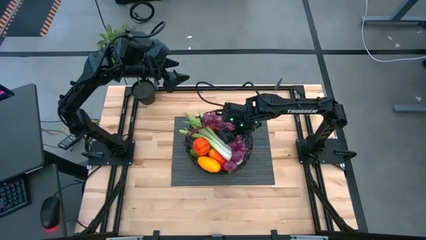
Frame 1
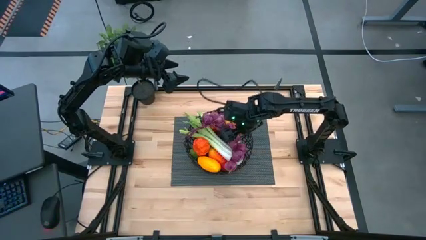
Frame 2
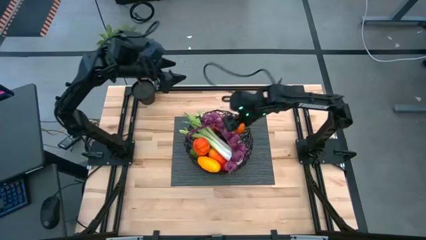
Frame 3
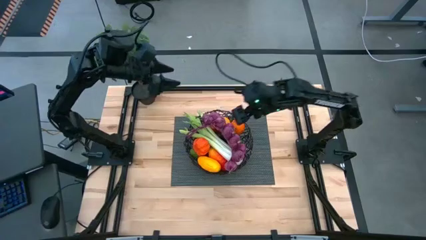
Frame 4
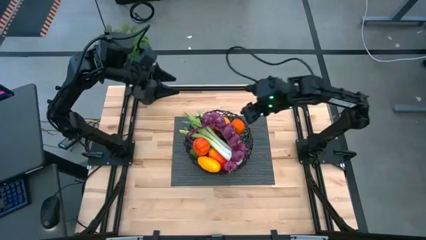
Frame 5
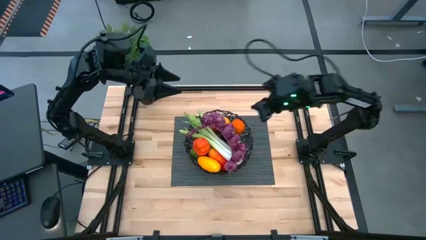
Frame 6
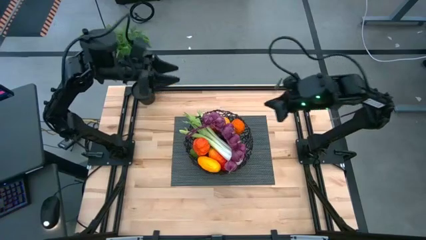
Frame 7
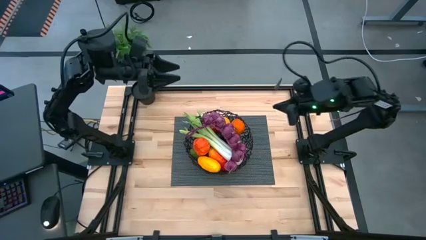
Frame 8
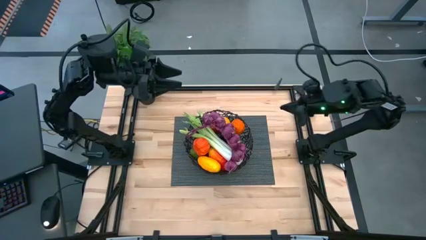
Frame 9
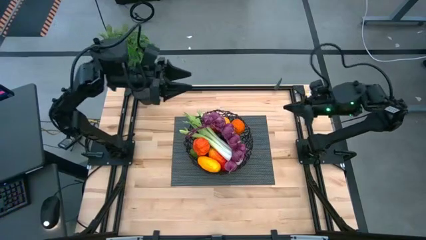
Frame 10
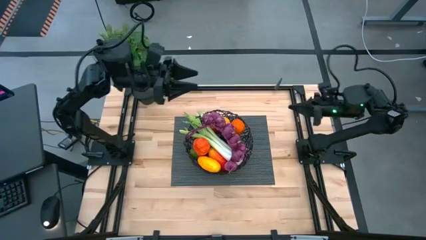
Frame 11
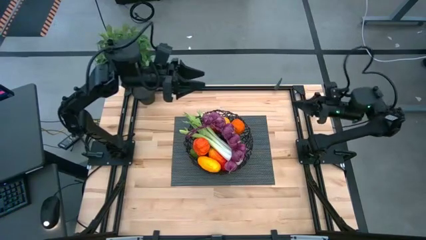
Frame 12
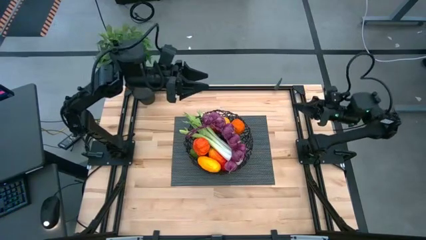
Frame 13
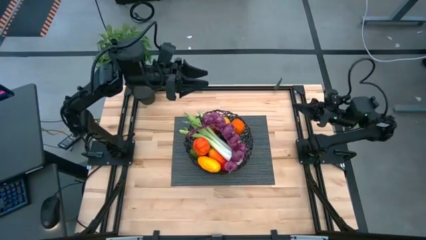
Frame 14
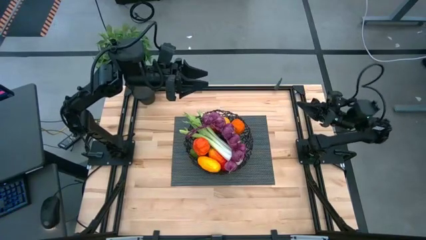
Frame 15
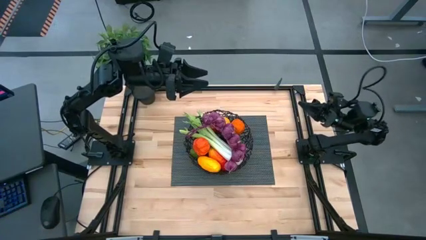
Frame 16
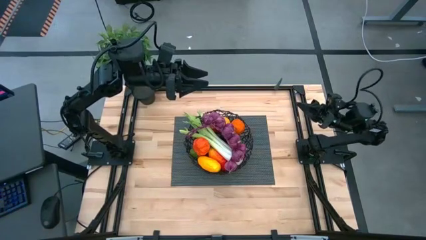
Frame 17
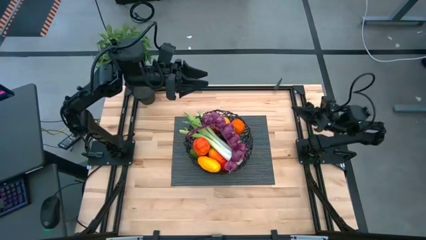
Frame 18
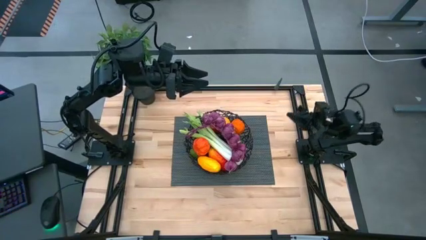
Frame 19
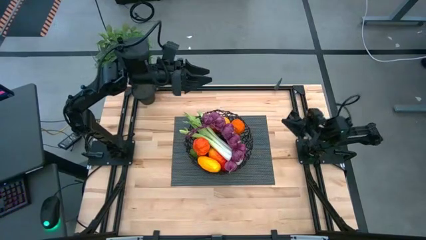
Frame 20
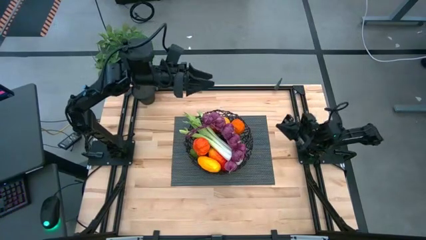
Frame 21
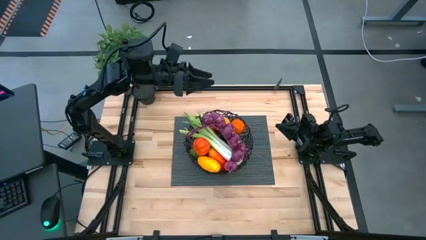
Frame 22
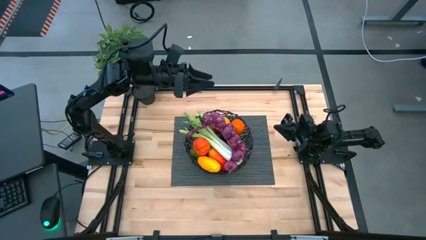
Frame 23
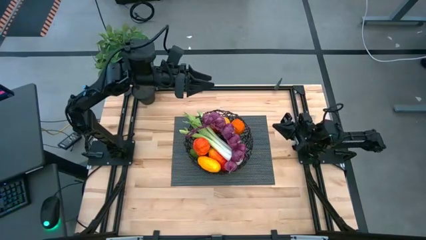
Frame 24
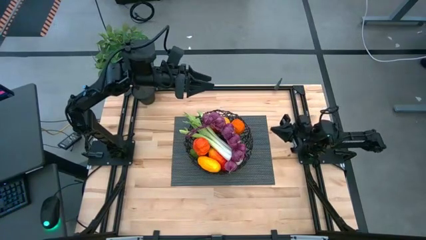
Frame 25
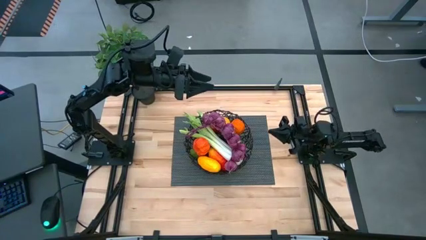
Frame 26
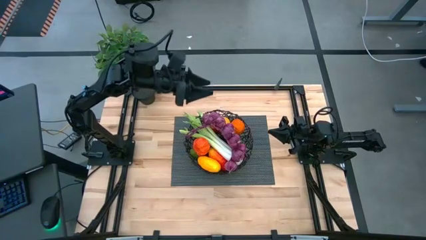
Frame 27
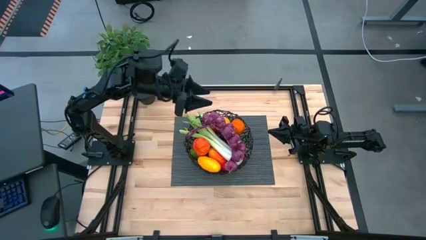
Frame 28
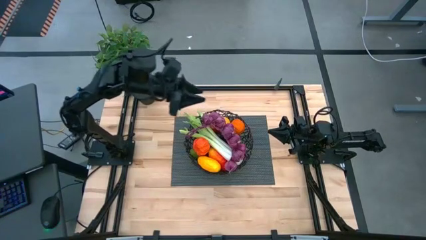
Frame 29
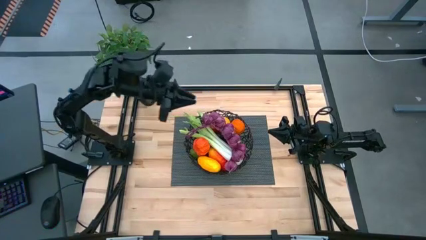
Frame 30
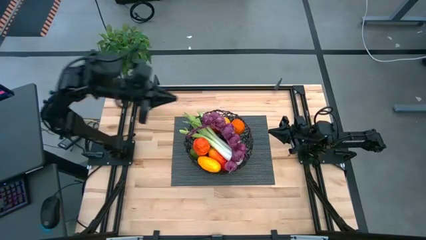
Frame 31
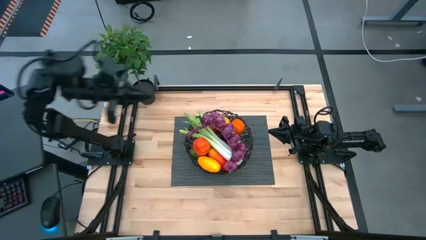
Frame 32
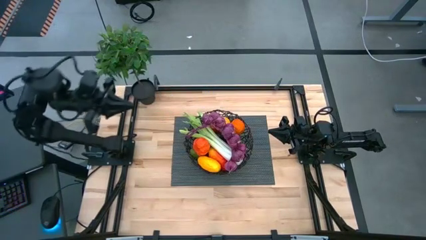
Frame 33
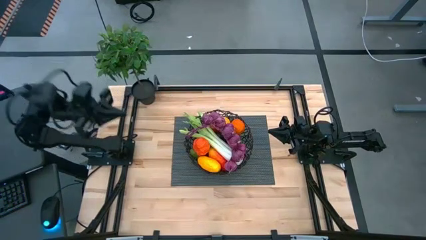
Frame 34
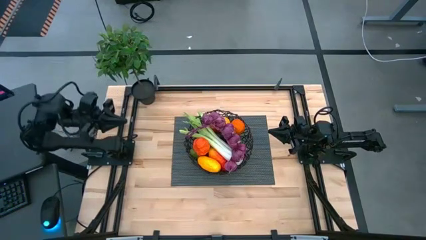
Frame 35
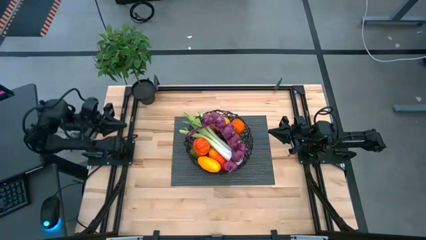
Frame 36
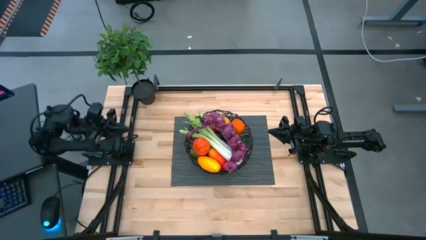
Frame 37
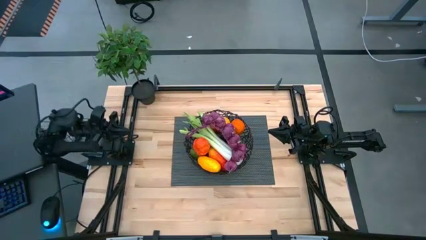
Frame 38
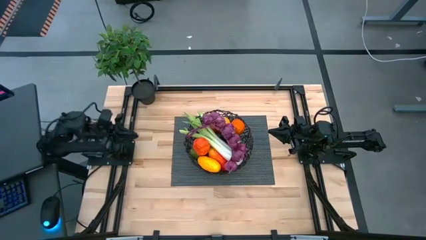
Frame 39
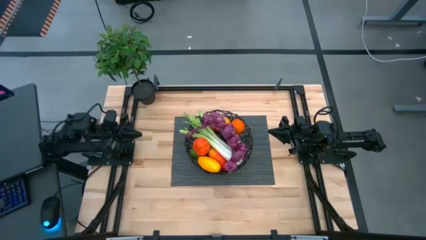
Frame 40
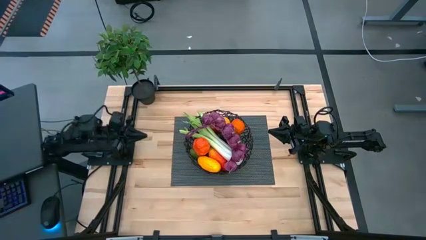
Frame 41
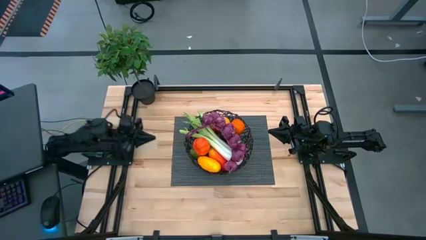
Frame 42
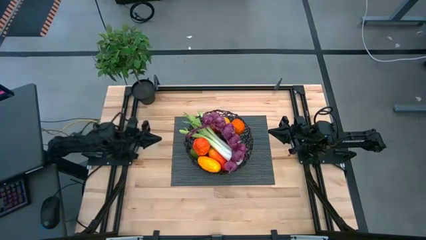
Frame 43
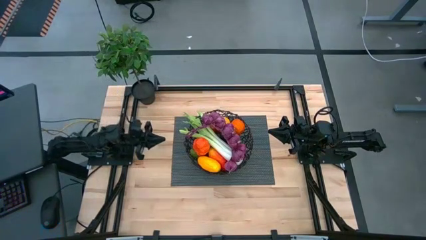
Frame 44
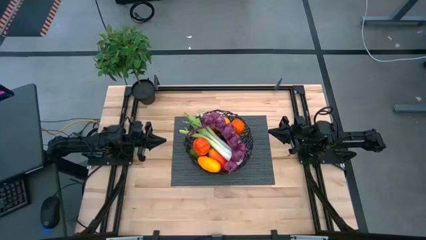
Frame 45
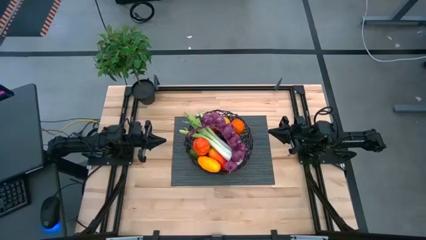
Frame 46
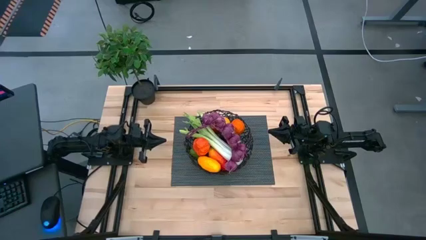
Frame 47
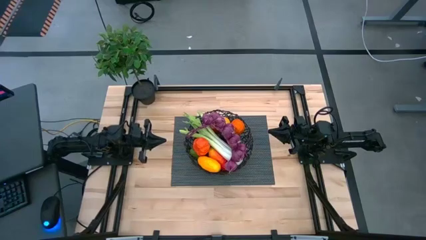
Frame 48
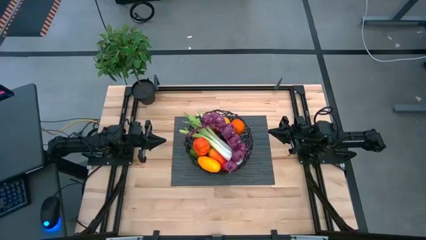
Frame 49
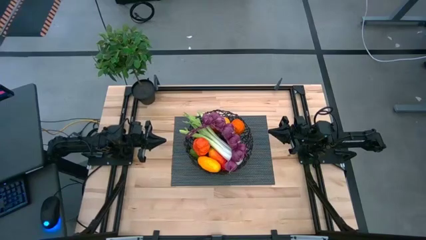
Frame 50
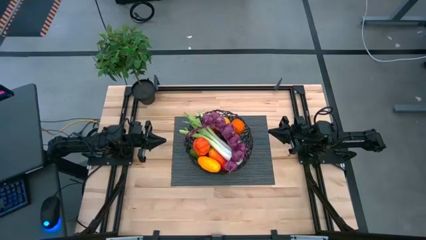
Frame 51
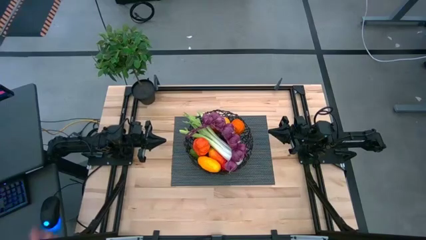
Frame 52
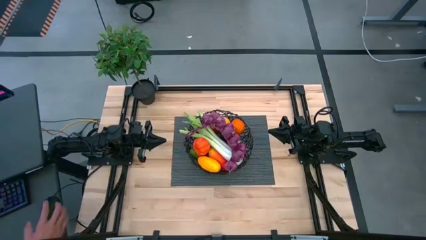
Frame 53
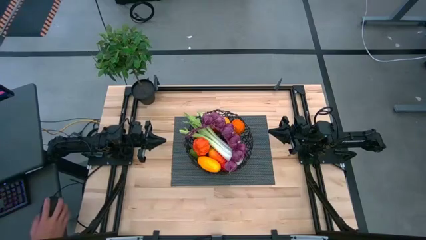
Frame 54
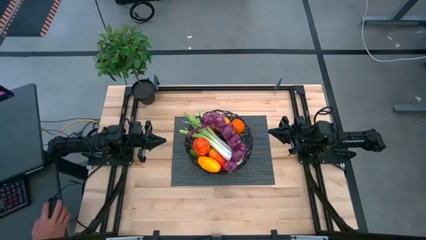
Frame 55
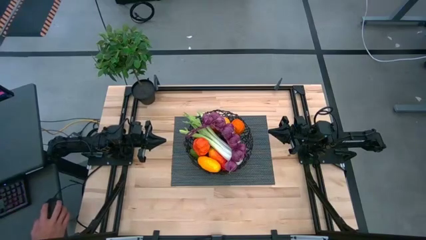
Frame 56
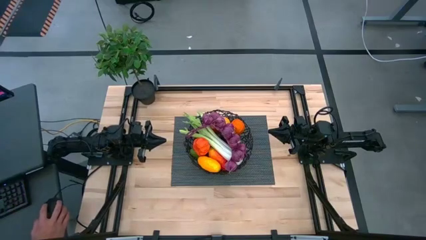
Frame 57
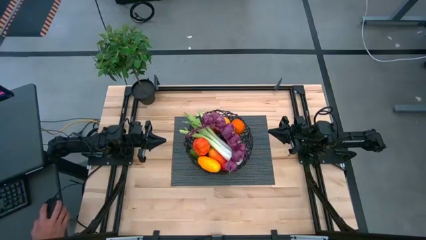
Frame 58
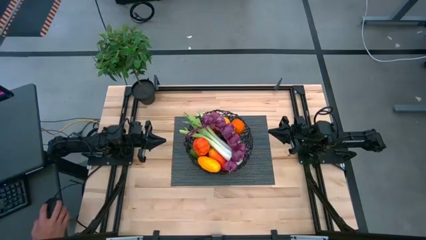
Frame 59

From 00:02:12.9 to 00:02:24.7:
Task: Build produce basket
Return to Home Position

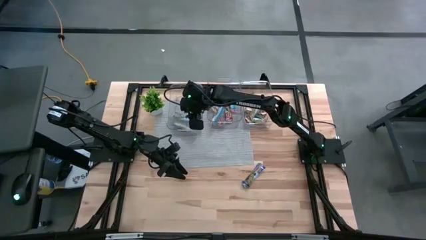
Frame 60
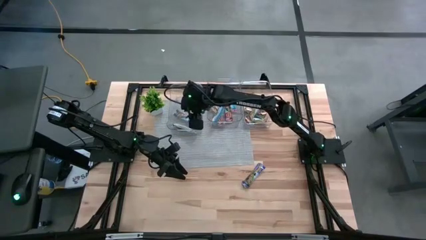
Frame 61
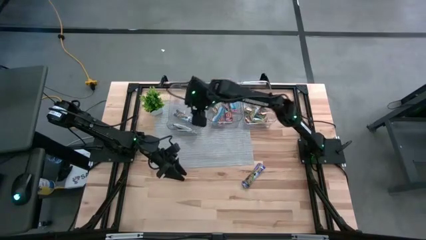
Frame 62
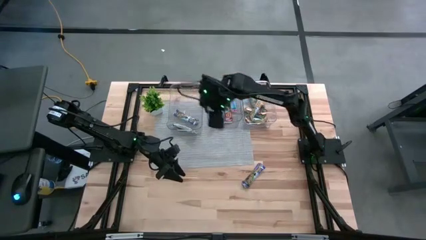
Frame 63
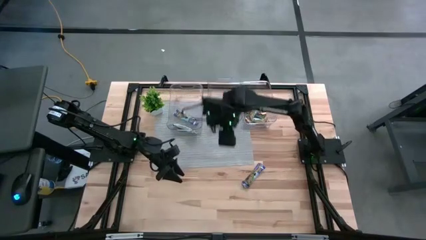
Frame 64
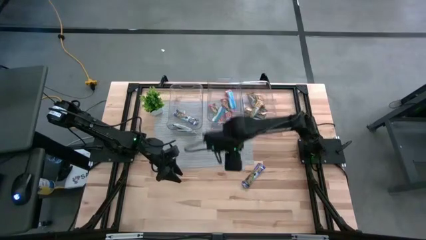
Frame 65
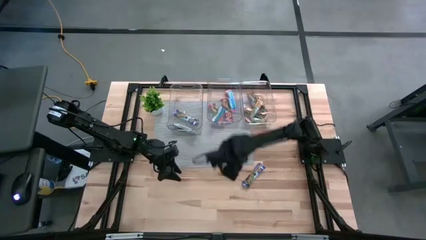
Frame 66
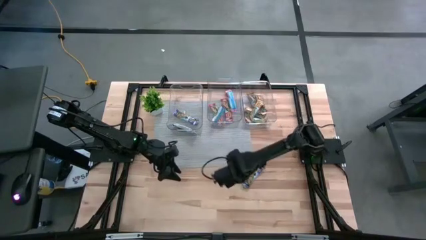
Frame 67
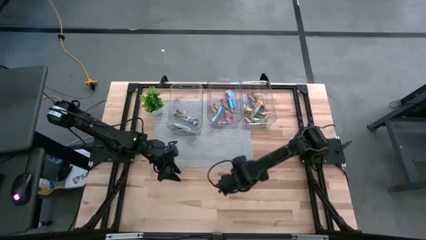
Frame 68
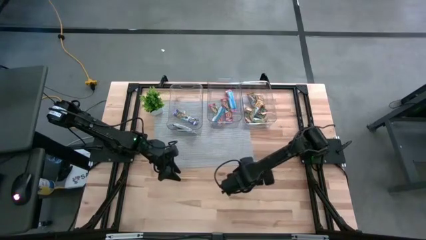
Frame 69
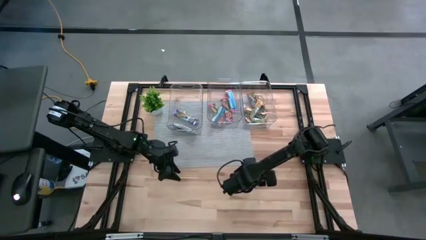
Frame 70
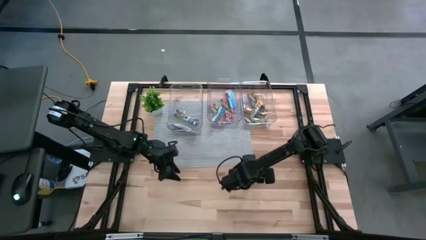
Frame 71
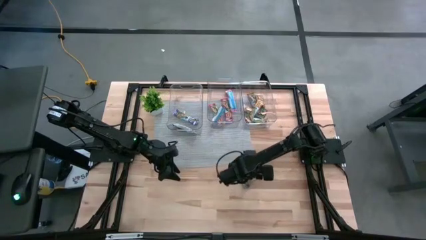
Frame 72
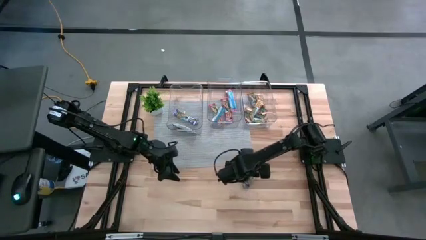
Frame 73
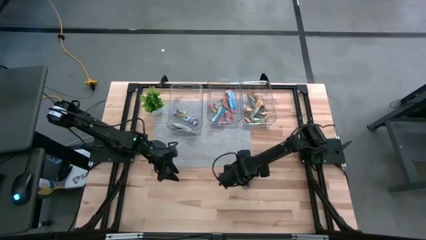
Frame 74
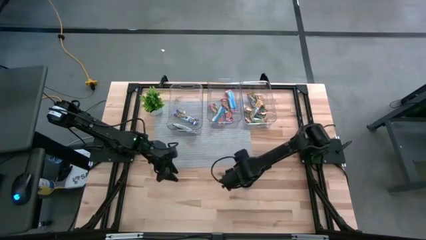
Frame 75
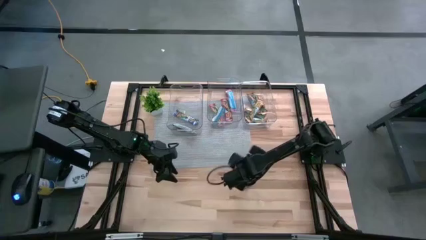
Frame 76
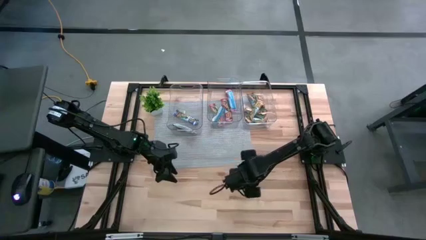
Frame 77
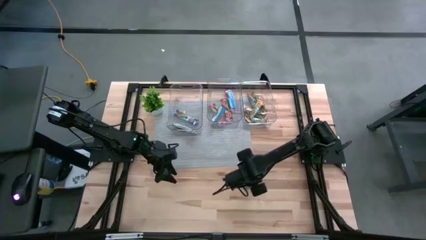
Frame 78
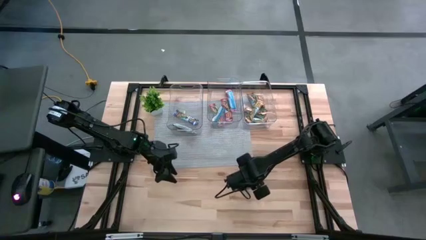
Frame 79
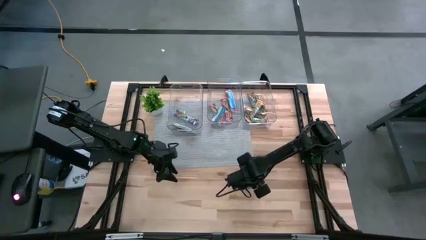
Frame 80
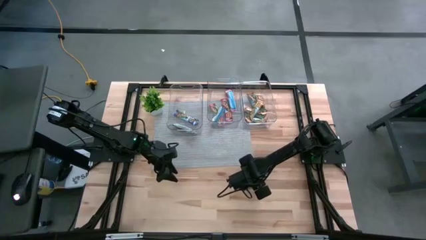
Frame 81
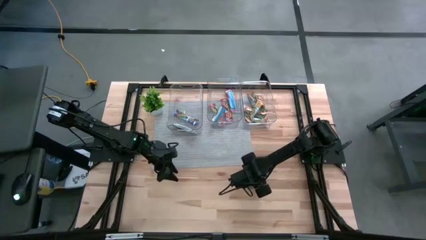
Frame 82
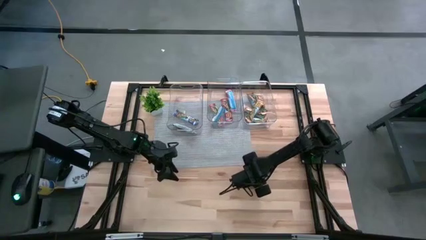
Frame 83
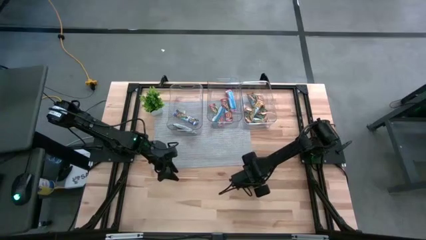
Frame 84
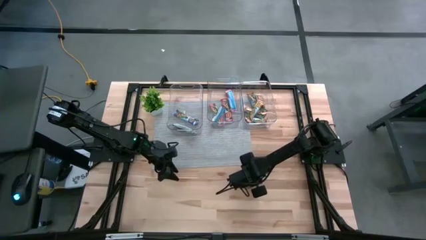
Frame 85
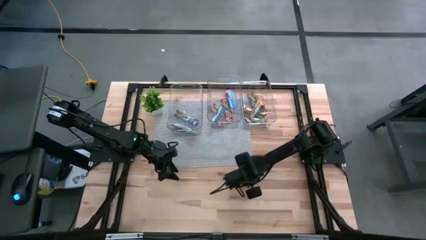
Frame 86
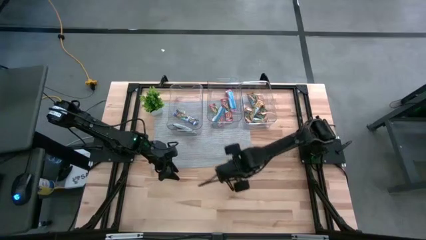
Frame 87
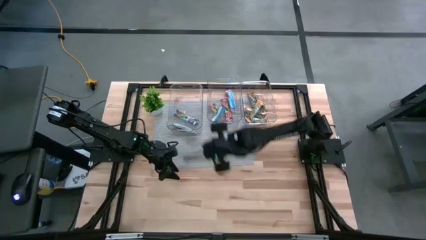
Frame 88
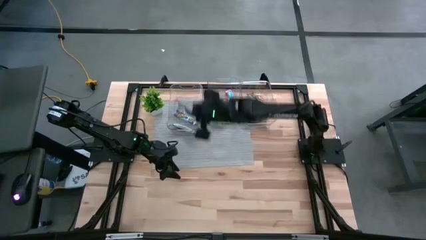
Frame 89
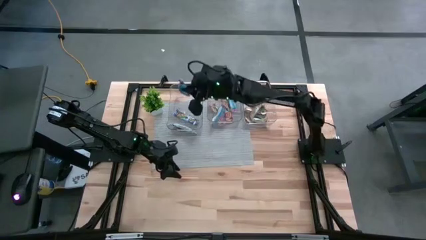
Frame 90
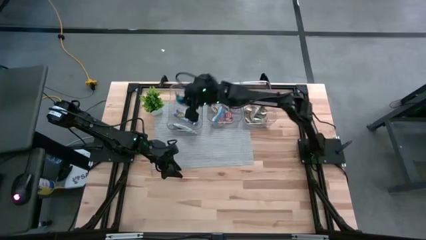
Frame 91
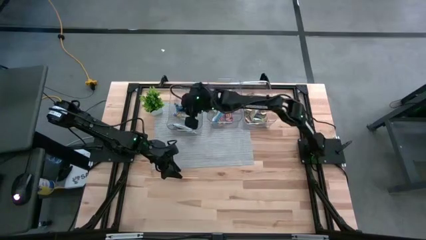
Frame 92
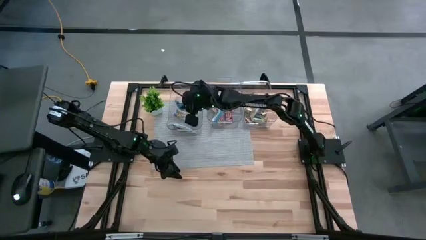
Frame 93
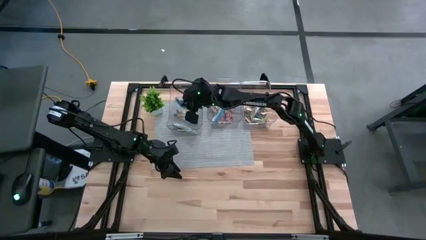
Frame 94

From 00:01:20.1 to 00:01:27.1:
Task: Pick and place Granola Bars by type
Put the blue granola bar into the left transparent bin
